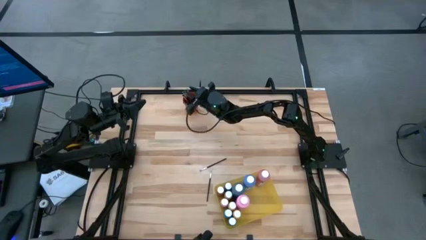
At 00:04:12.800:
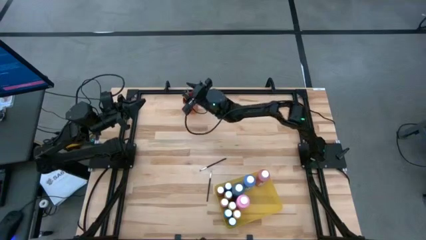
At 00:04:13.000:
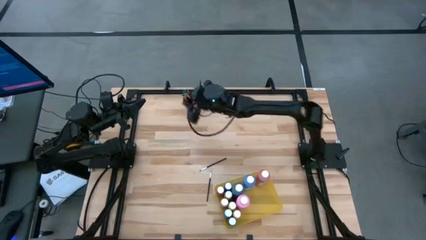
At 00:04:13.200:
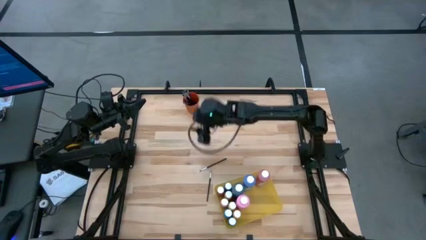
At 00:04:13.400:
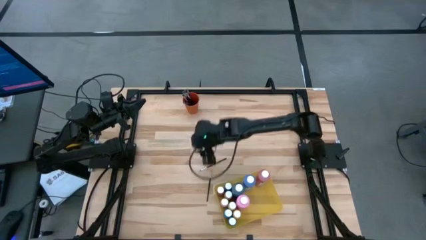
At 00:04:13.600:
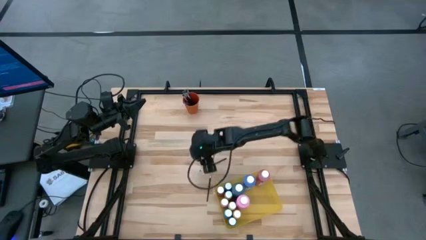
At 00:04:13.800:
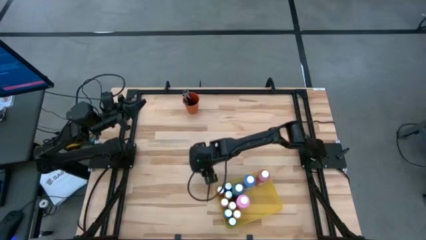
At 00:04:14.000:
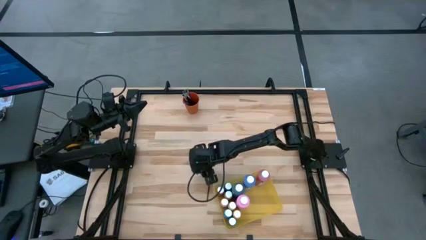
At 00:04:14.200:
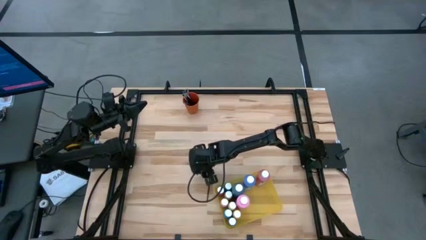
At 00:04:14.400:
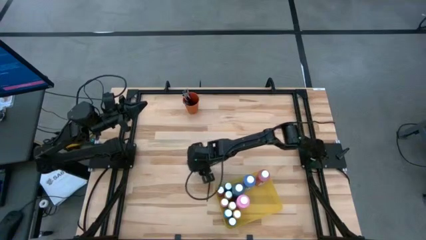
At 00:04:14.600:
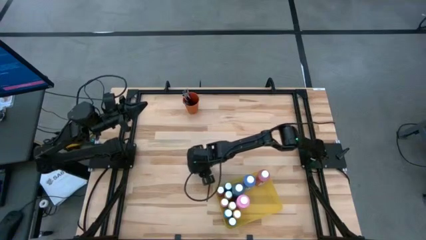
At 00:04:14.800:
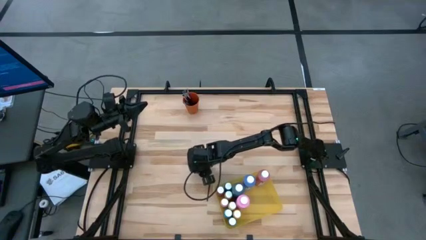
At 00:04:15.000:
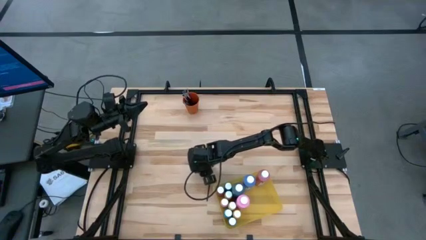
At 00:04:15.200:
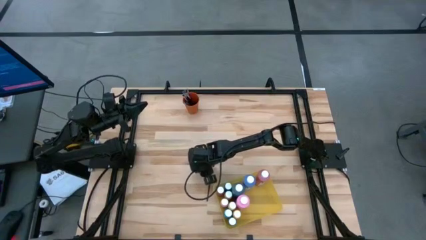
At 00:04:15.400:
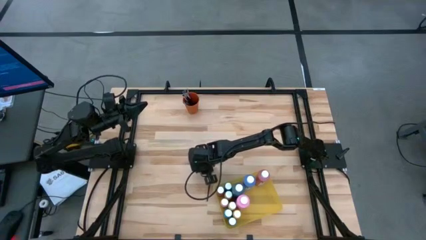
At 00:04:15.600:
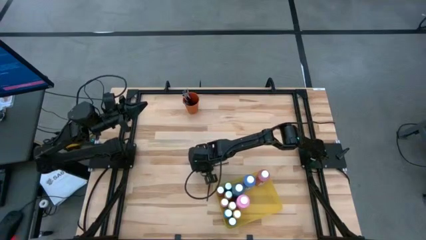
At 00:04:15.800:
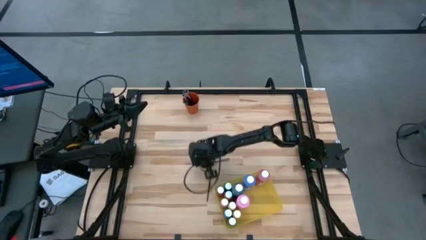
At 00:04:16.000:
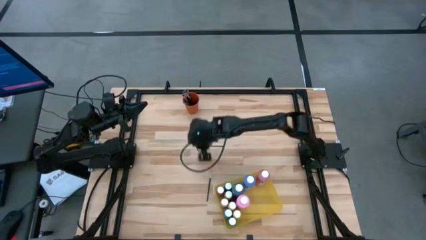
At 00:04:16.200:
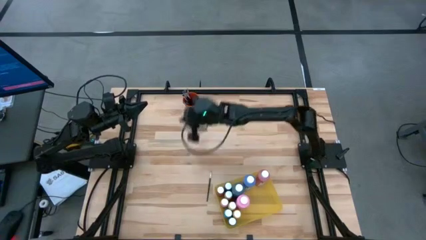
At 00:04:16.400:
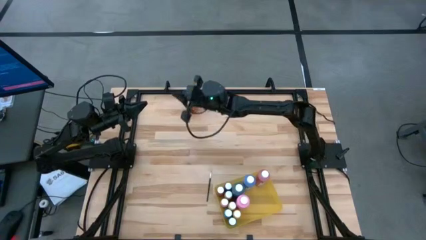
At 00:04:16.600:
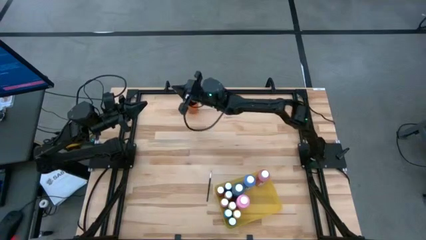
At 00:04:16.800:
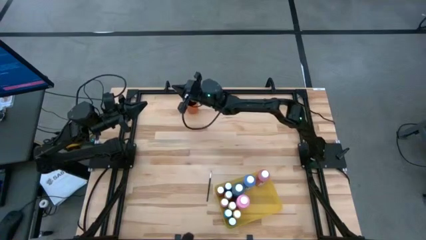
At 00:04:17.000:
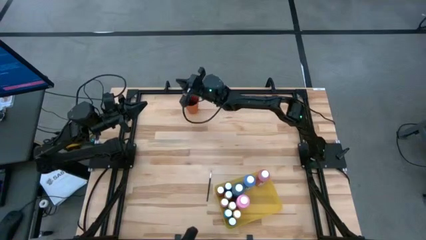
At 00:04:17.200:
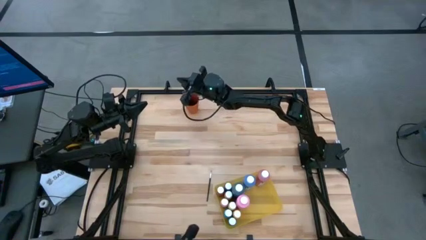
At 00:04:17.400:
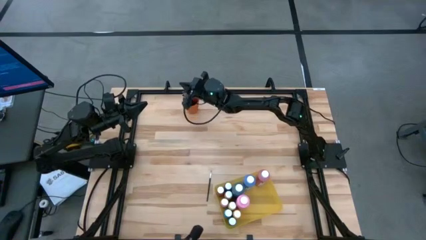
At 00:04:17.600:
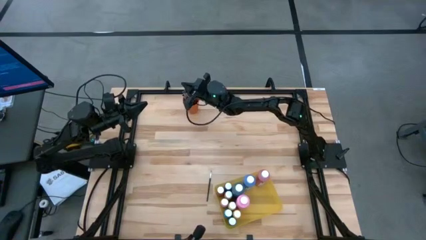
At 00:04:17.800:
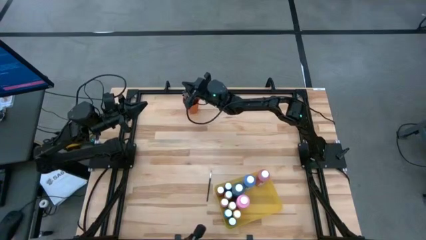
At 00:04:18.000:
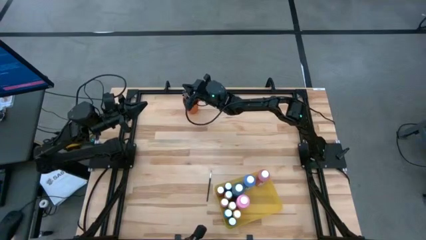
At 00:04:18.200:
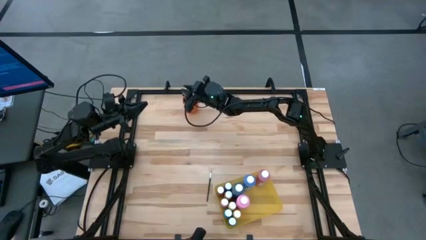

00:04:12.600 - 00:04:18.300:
Task: Pick & Place Paint Supplies
Put the black paint brush into the orange cup

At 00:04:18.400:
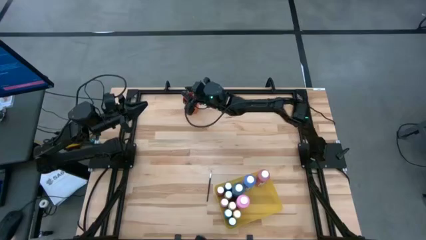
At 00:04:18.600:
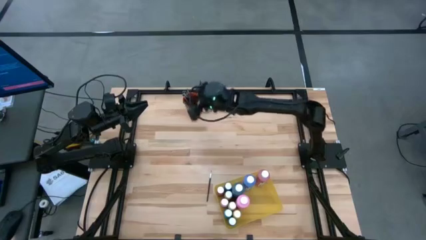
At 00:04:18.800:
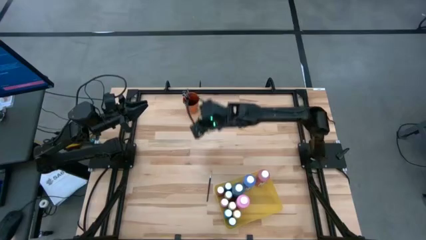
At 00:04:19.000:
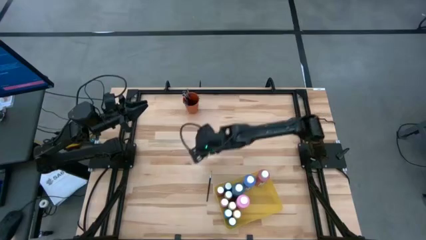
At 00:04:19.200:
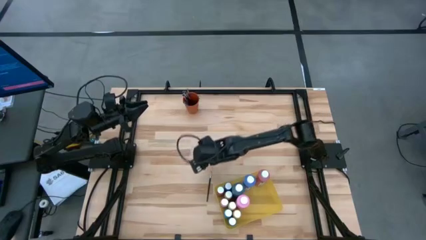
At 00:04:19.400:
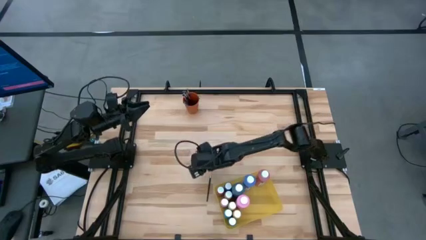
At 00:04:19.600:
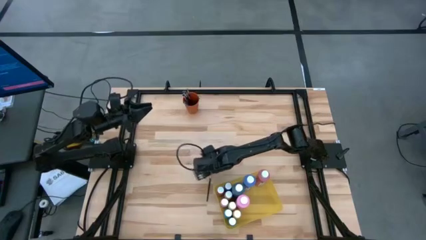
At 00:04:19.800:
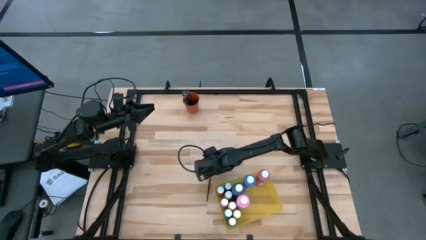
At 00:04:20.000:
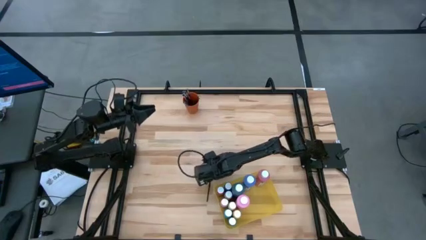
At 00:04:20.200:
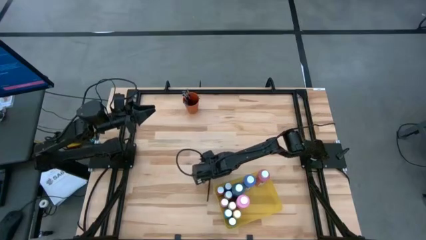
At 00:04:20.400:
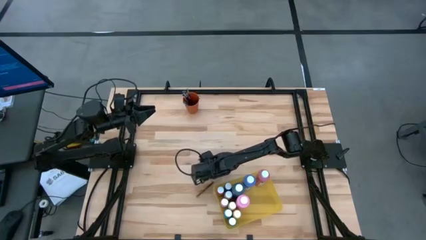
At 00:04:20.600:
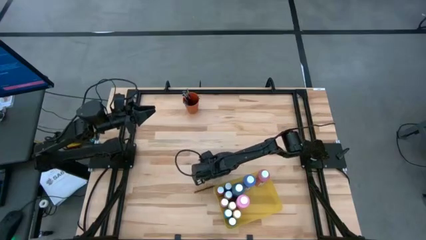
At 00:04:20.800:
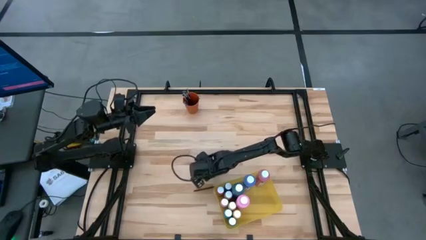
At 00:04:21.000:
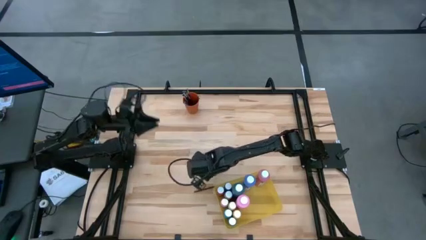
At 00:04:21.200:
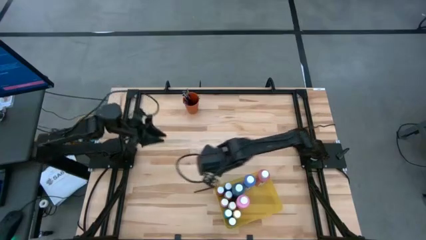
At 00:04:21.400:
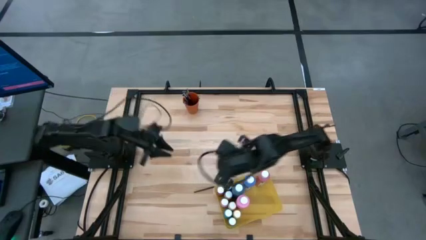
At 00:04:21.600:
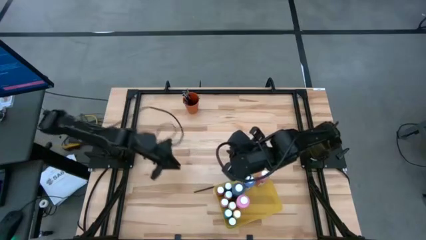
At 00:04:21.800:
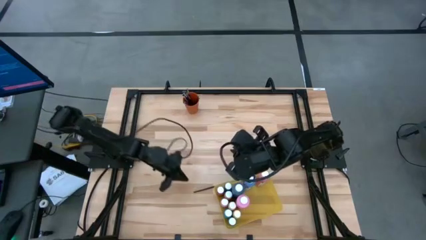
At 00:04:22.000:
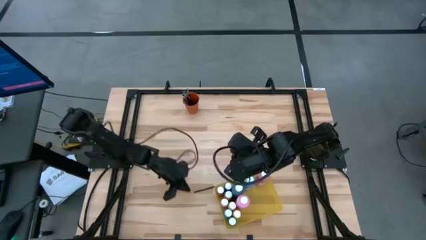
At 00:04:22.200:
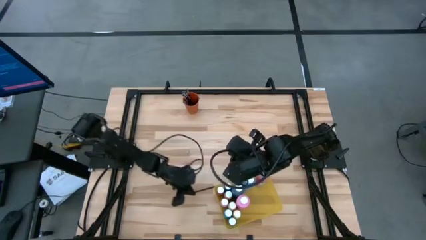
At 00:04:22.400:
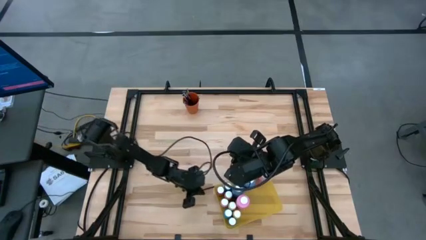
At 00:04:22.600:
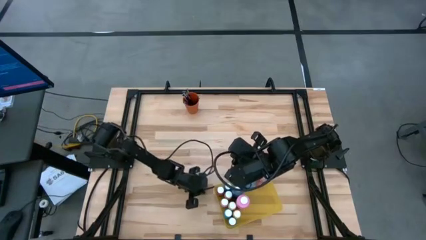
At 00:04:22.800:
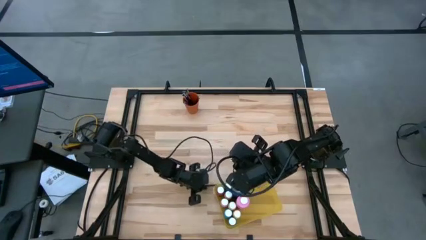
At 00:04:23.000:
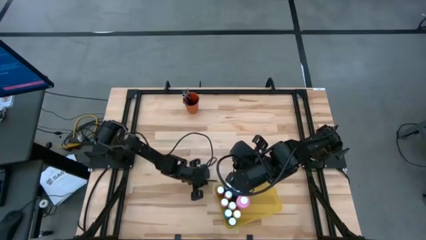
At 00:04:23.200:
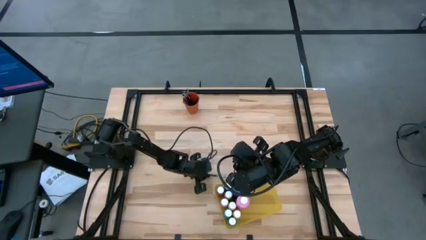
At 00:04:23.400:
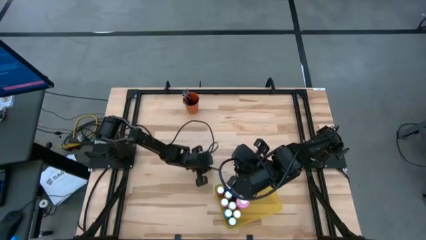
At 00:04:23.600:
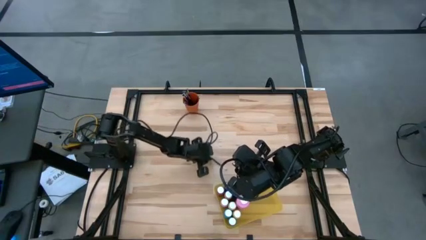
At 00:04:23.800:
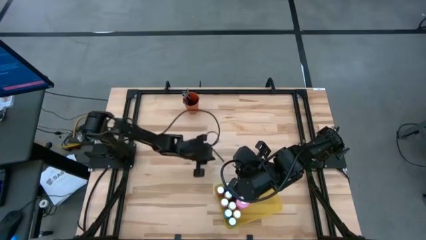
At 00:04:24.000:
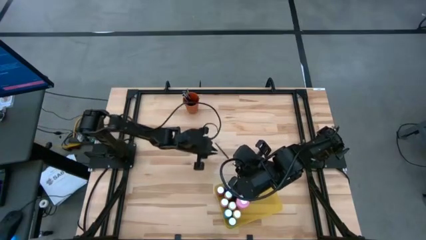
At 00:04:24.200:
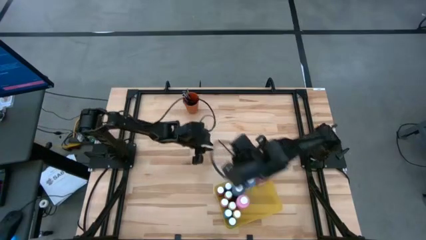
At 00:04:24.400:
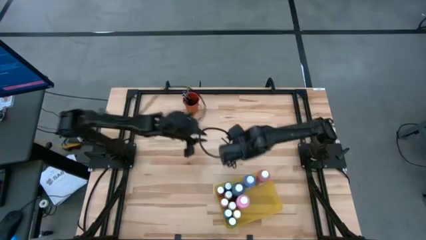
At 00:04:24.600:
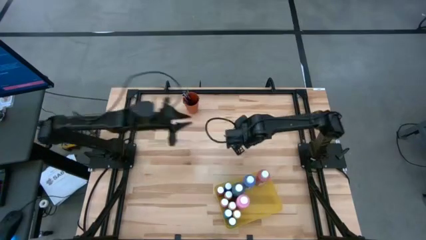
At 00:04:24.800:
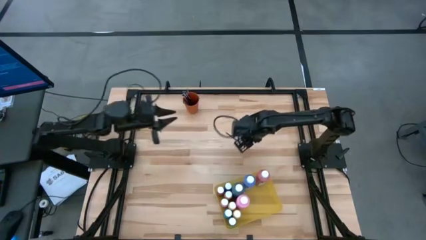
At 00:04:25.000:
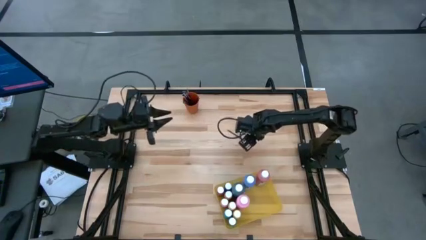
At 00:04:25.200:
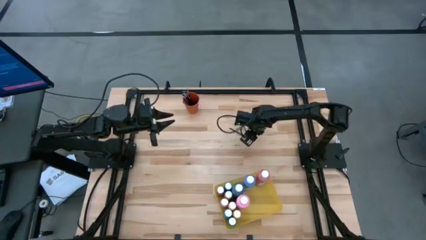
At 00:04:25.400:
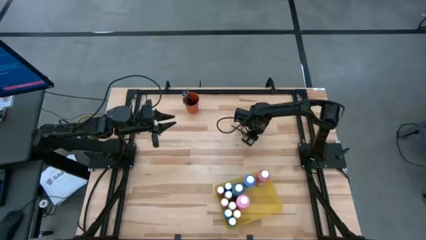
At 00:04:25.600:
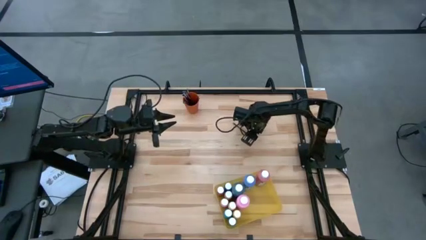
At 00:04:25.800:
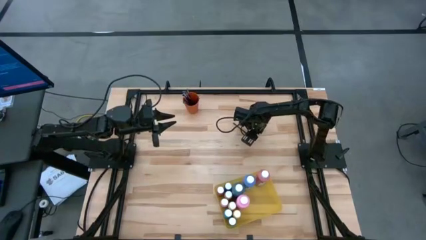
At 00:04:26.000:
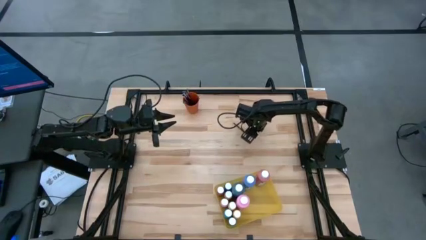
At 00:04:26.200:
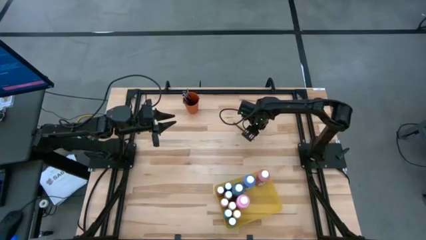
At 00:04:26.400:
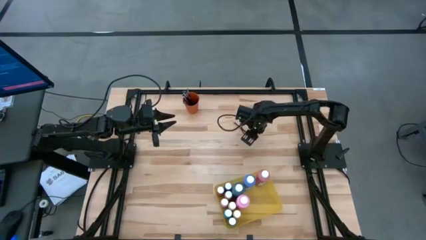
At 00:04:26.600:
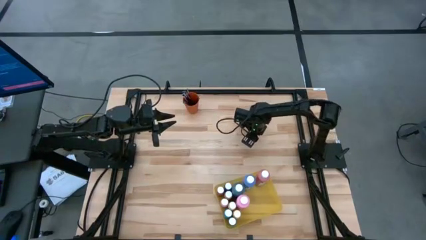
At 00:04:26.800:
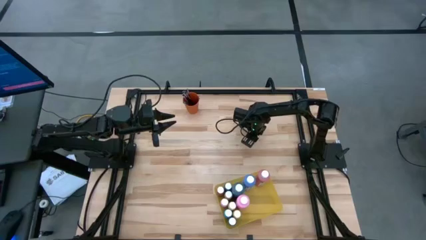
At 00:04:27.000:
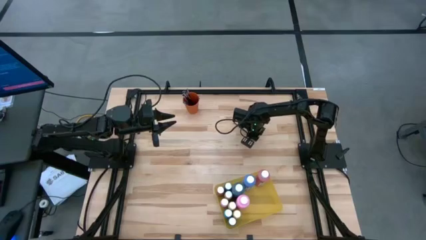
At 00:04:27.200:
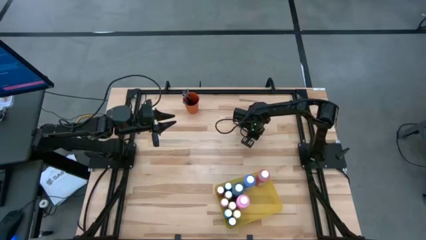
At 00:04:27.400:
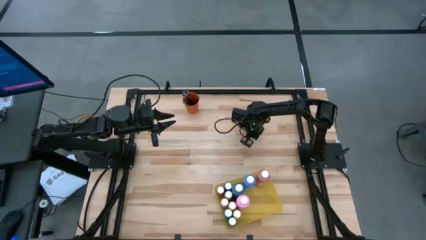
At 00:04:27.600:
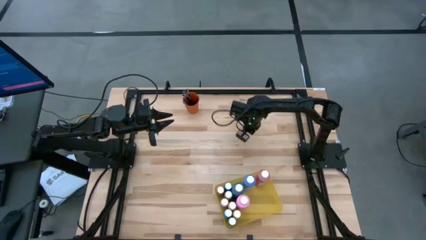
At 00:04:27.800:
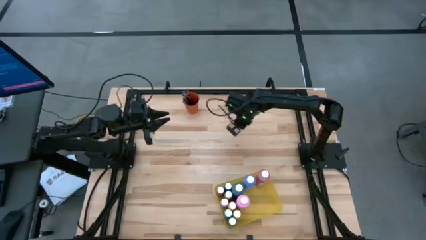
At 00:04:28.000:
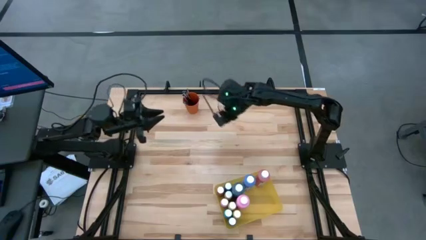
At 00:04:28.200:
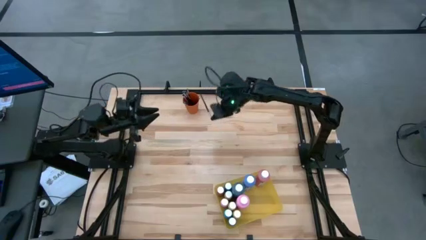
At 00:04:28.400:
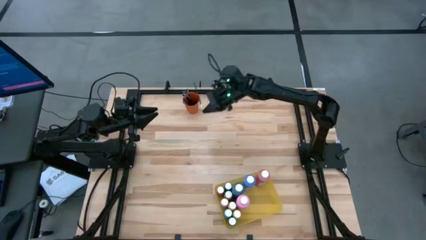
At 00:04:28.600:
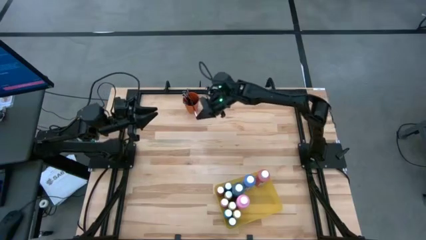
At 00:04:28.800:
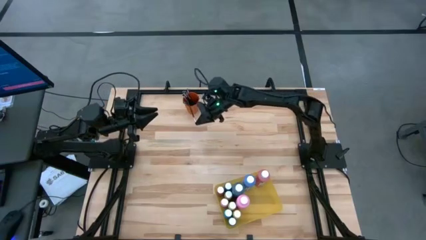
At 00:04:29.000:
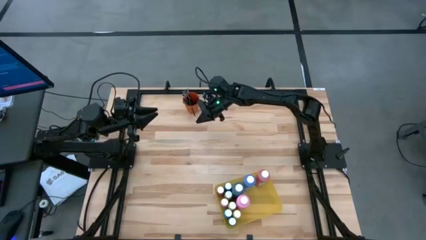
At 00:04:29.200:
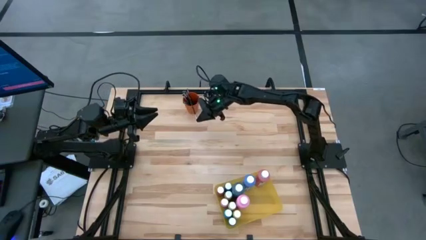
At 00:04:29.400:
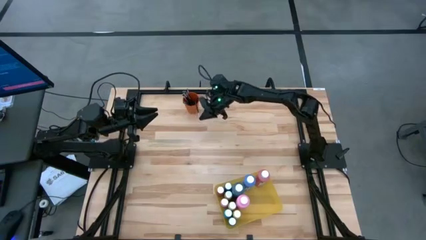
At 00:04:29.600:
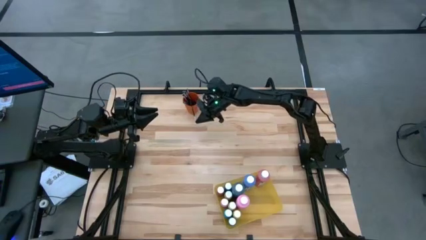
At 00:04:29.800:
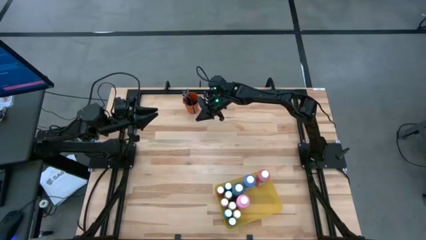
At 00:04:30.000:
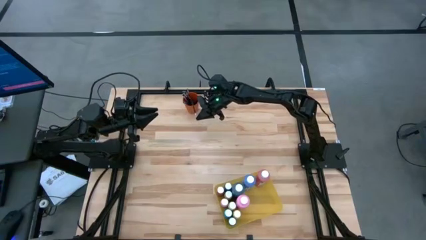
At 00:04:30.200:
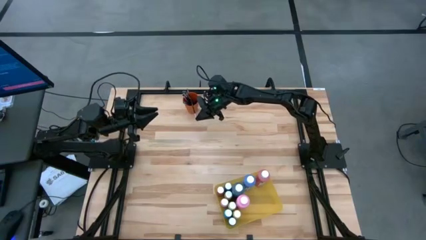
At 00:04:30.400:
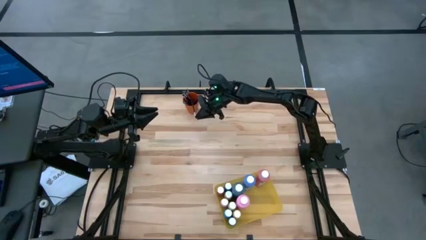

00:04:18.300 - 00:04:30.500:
Put the black paint brush into the orange cup
